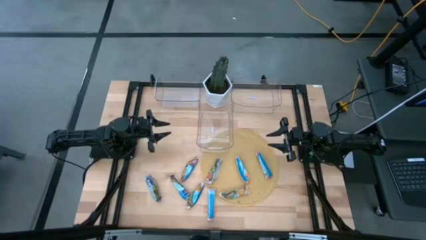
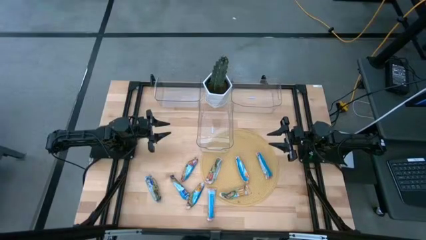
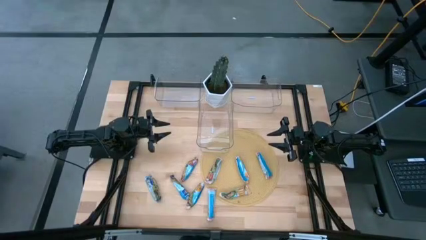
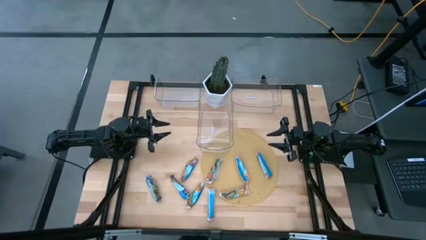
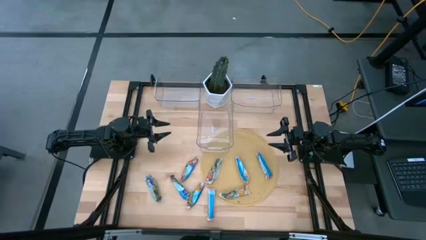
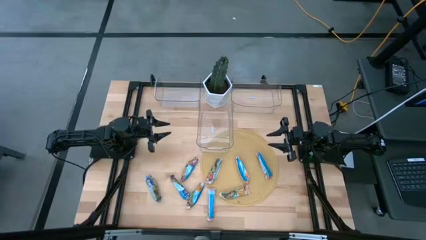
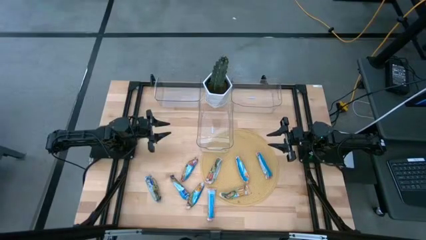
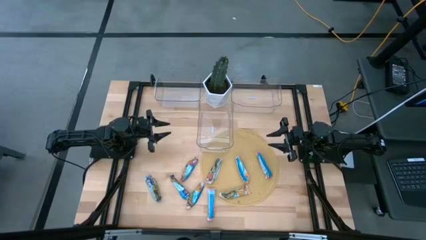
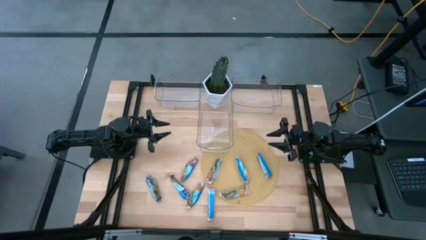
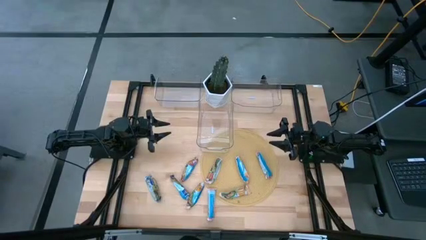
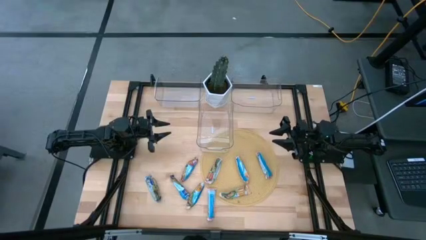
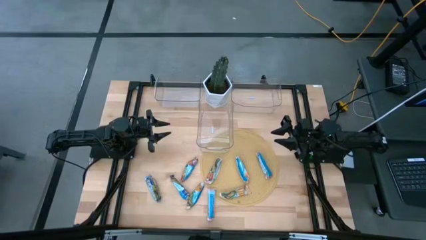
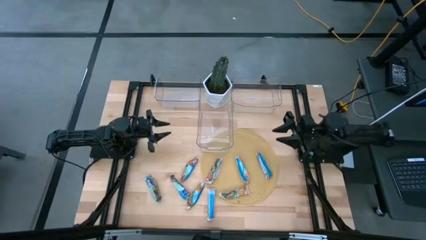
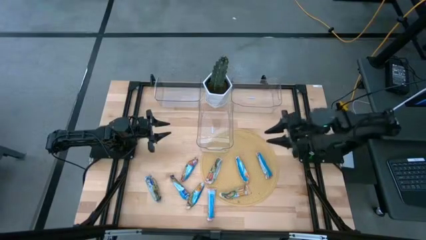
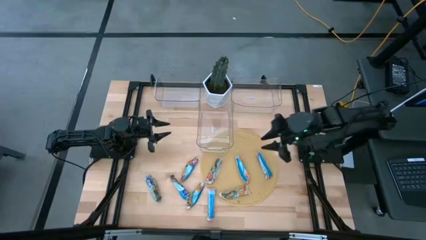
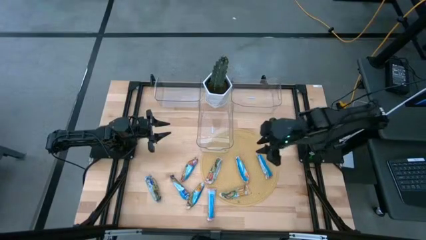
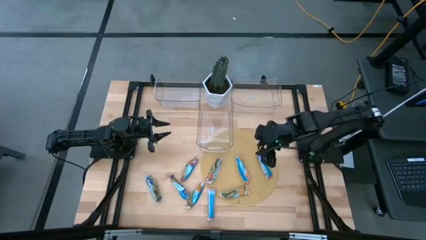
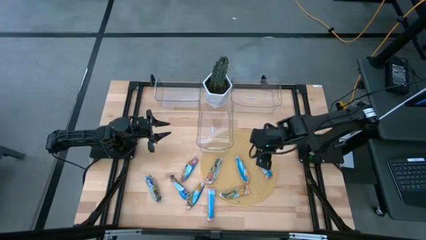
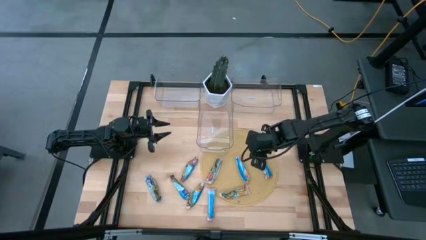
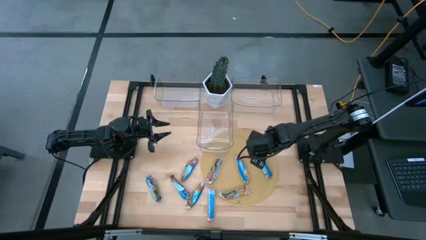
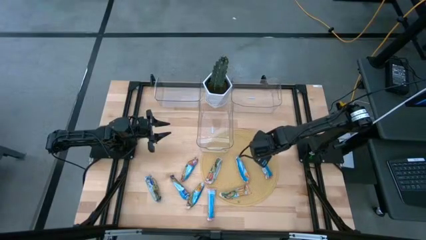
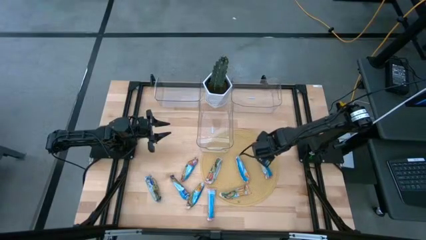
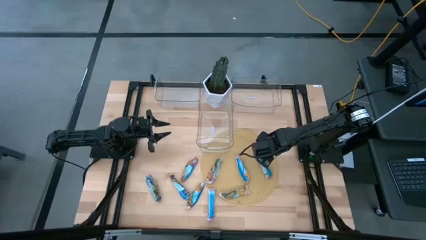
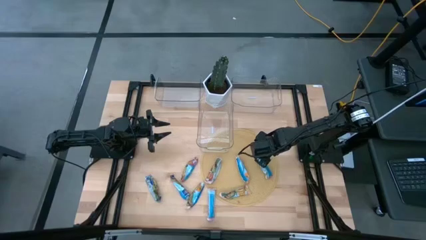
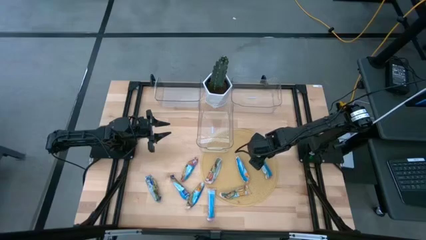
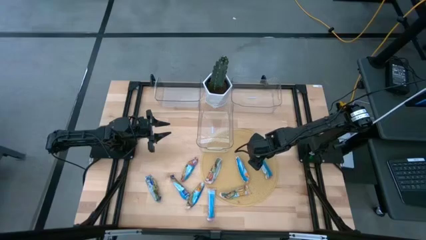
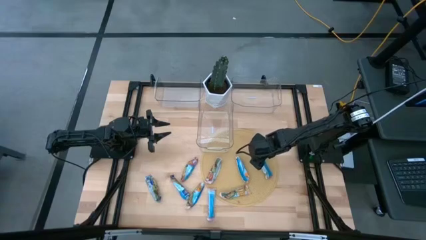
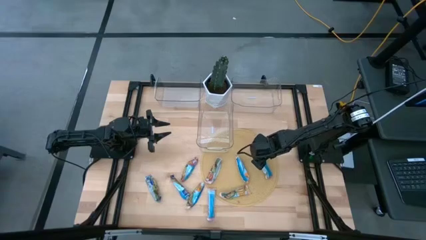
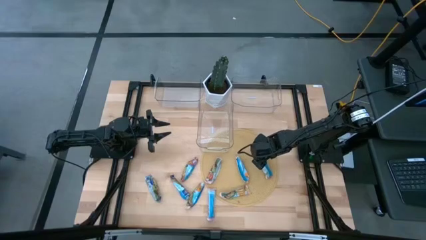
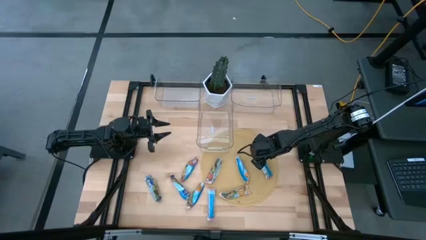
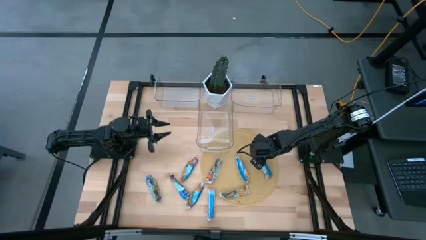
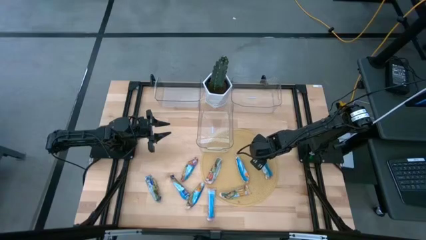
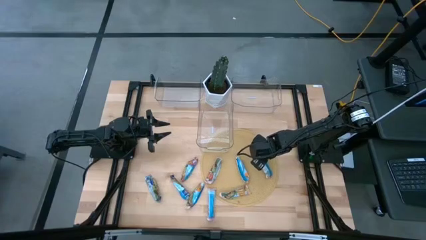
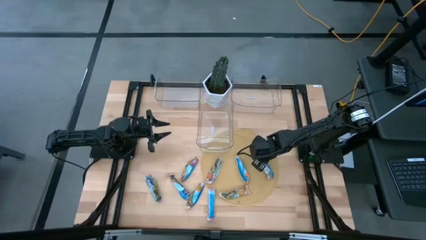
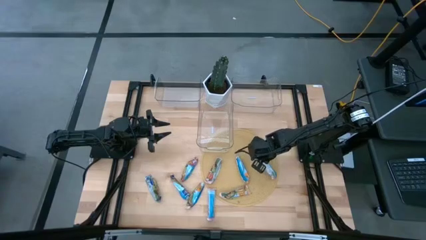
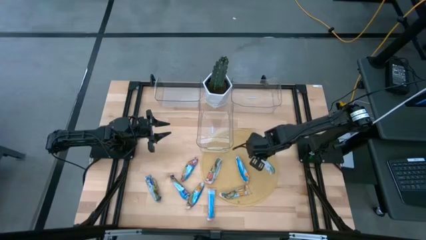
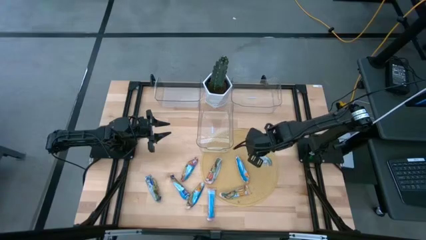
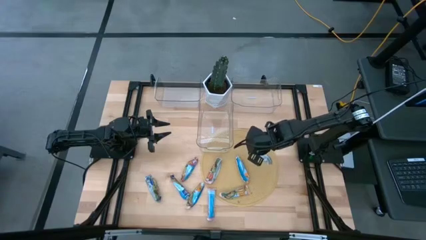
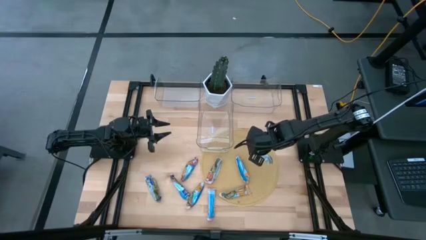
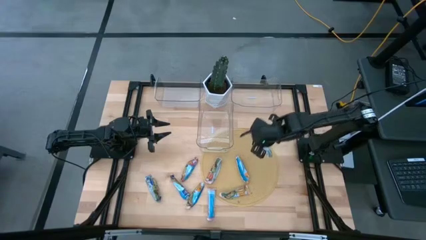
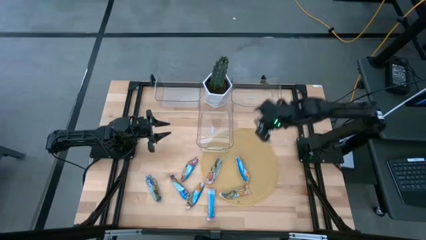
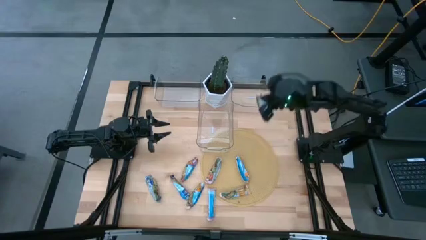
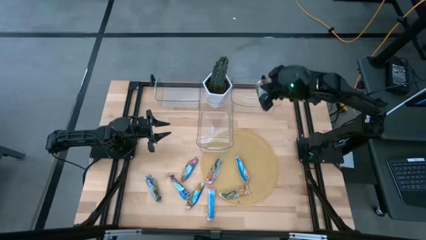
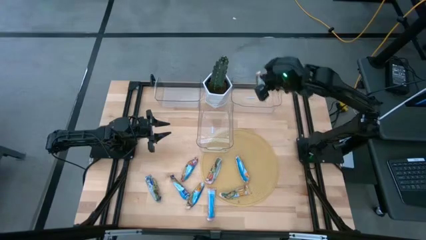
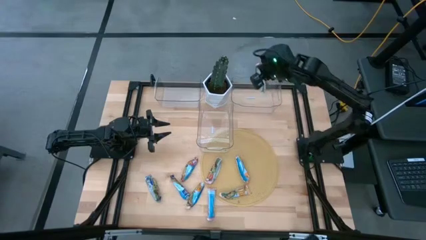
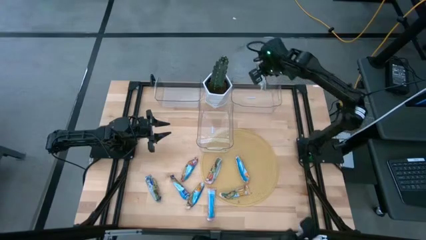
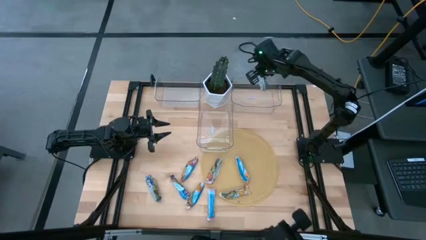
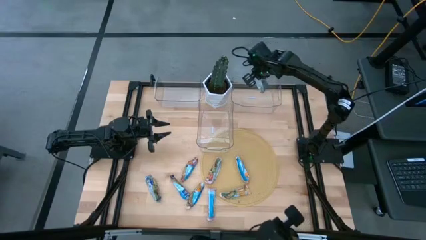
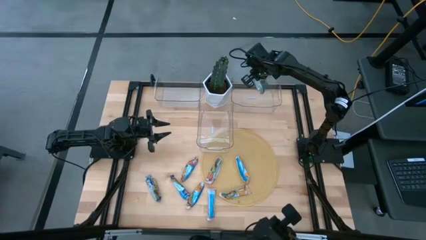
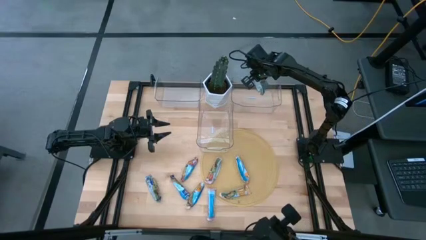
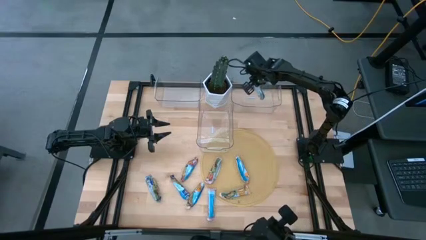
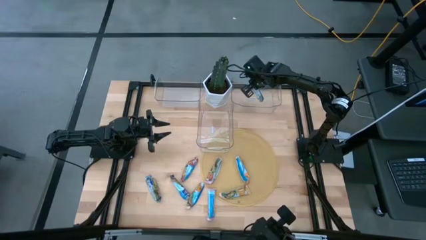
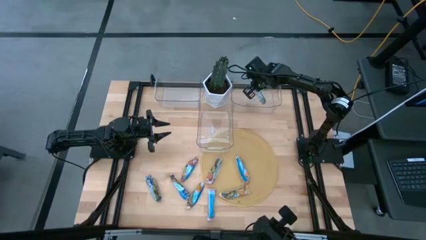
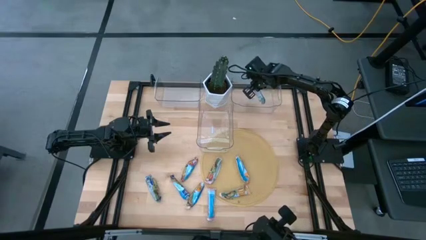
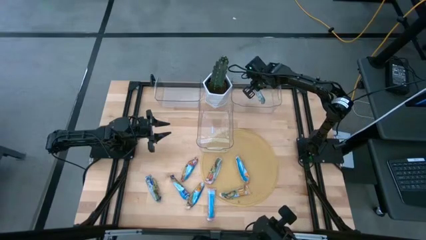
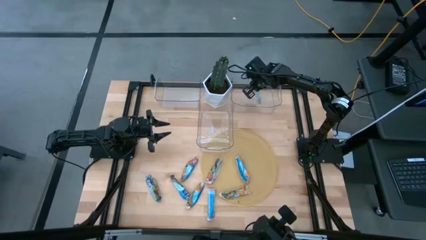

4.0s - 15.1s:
Task: Pick and place Granola Bars by type
Put the red green granola bar into the right transparent bin
